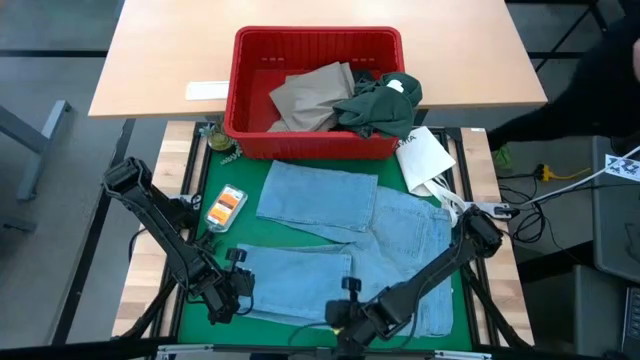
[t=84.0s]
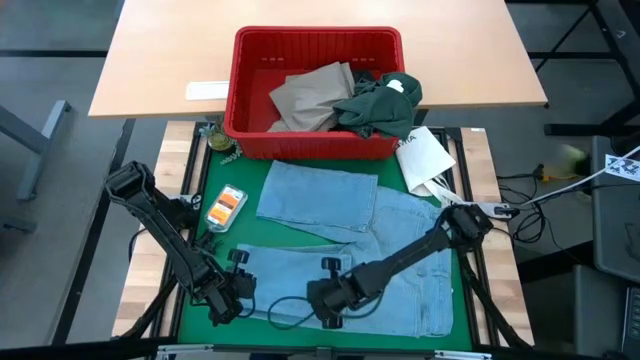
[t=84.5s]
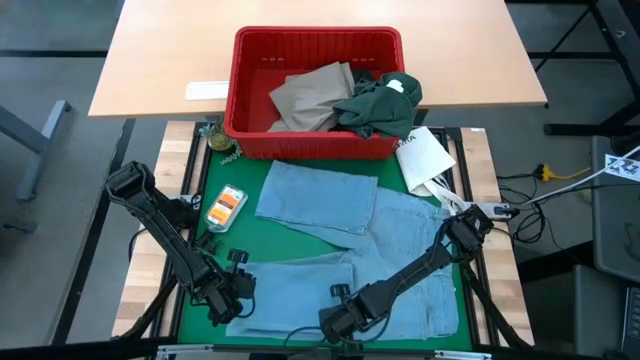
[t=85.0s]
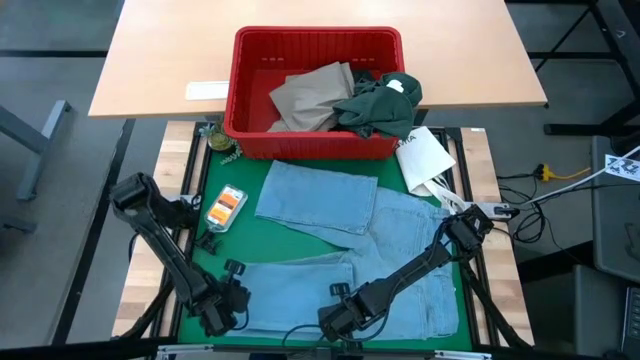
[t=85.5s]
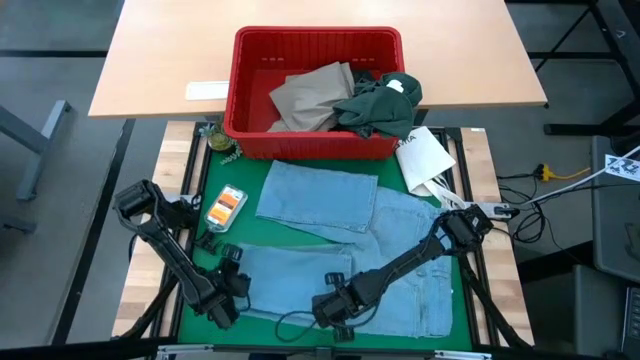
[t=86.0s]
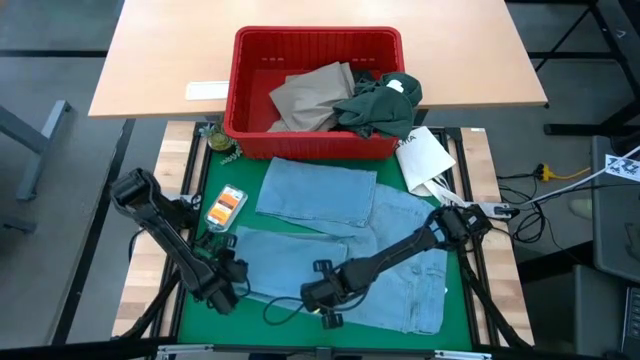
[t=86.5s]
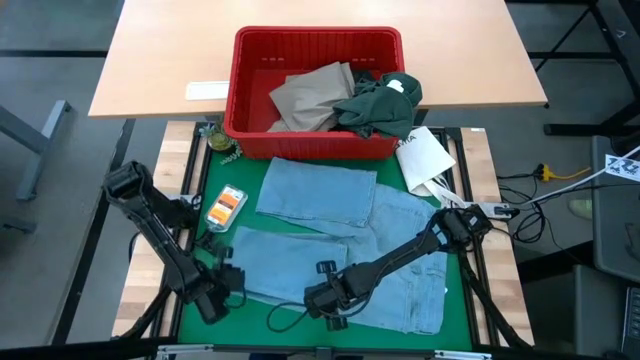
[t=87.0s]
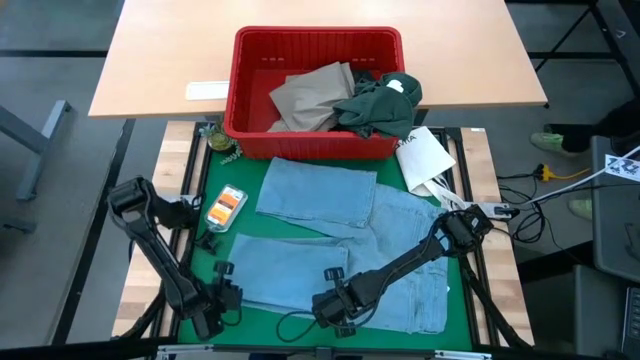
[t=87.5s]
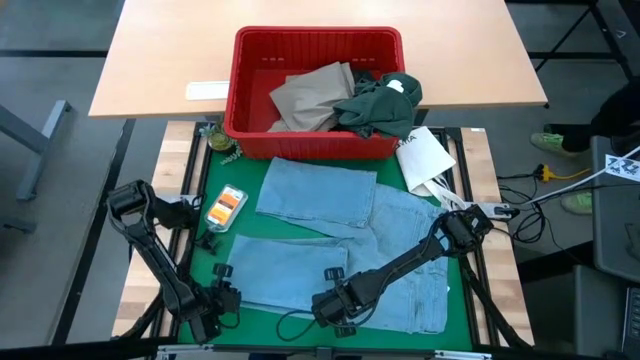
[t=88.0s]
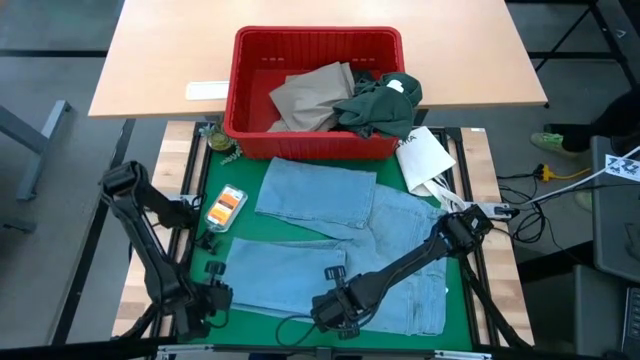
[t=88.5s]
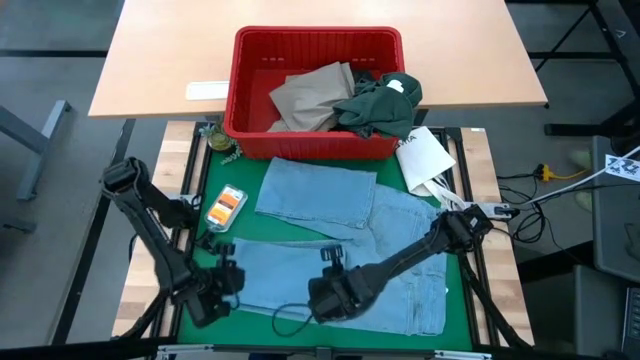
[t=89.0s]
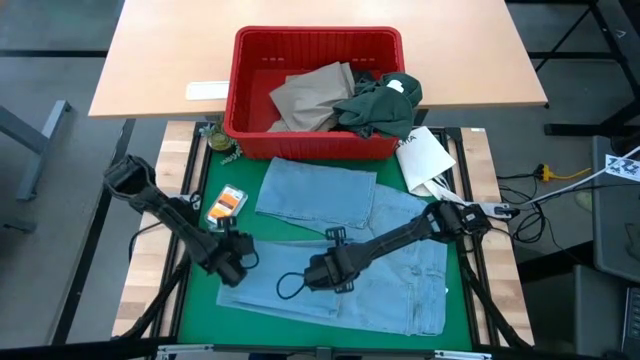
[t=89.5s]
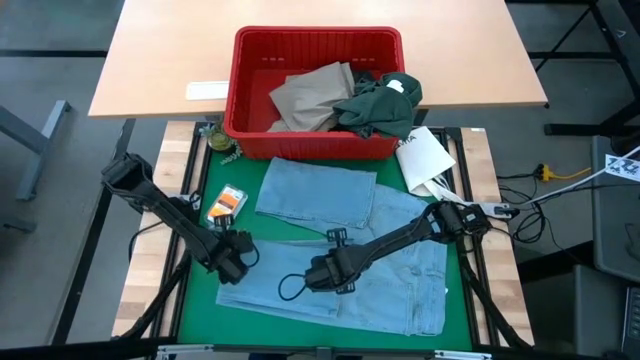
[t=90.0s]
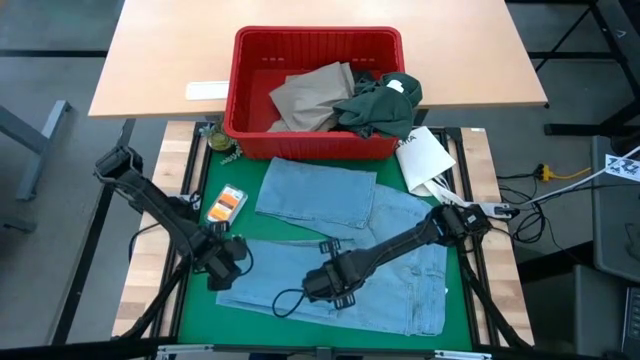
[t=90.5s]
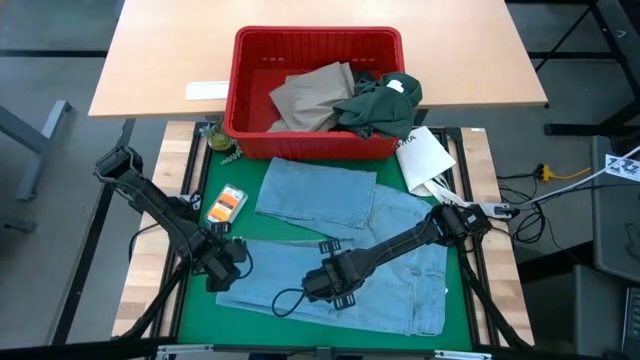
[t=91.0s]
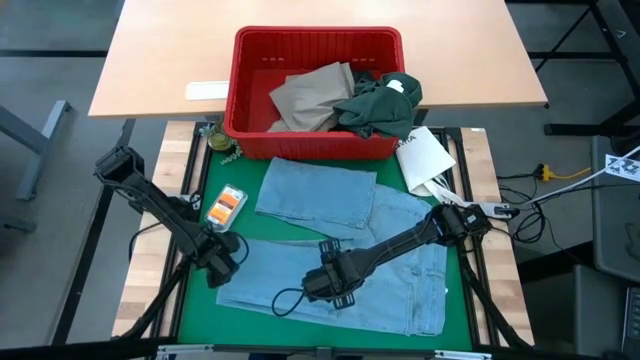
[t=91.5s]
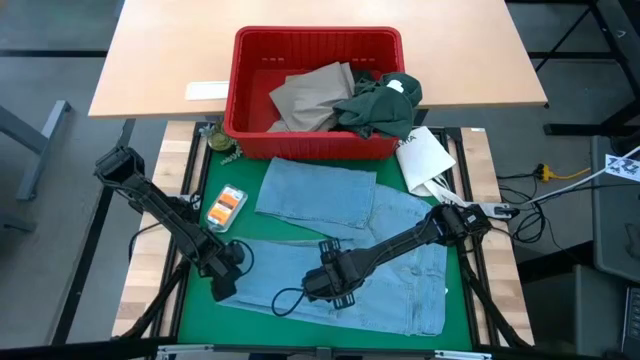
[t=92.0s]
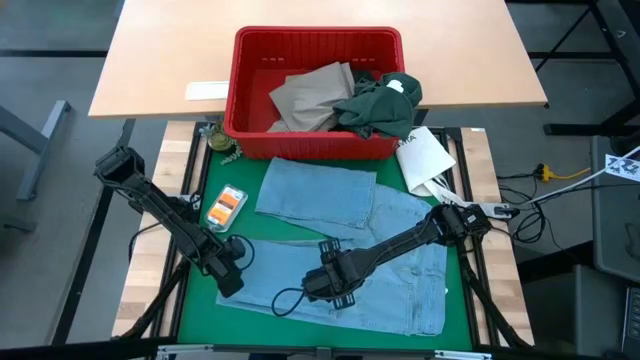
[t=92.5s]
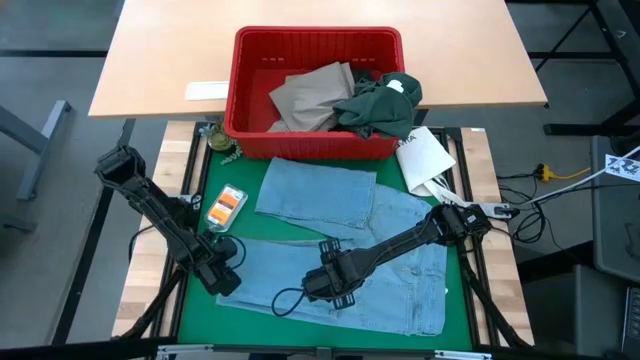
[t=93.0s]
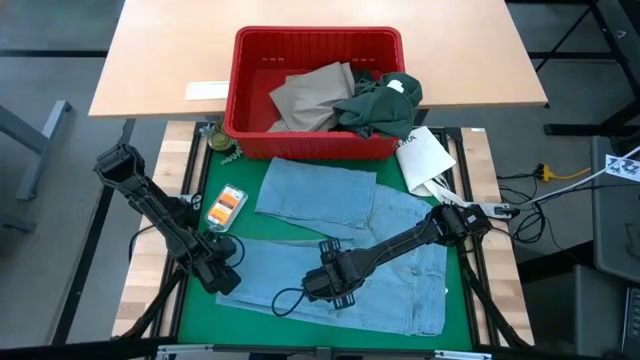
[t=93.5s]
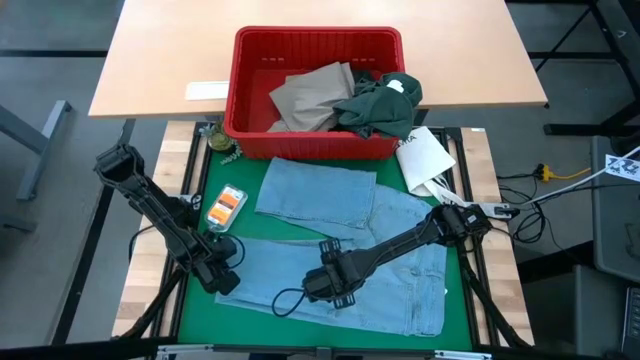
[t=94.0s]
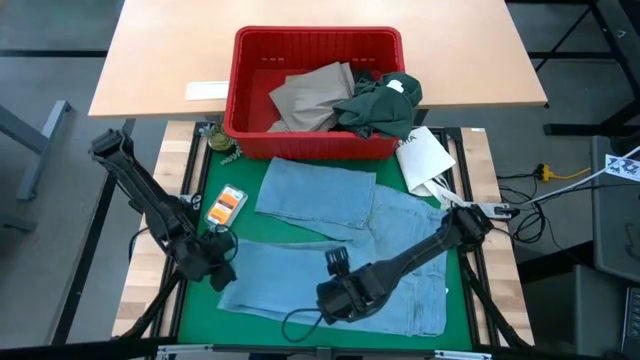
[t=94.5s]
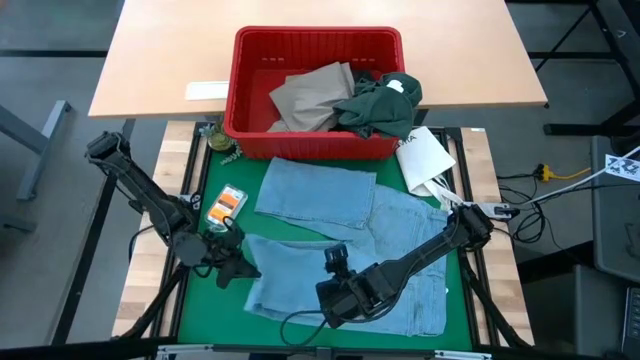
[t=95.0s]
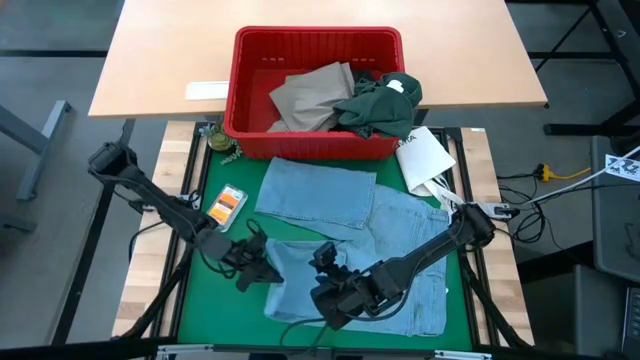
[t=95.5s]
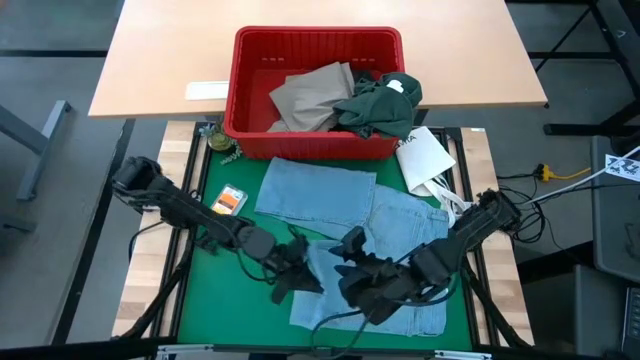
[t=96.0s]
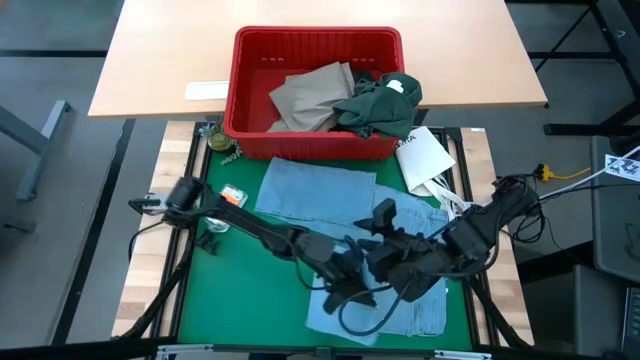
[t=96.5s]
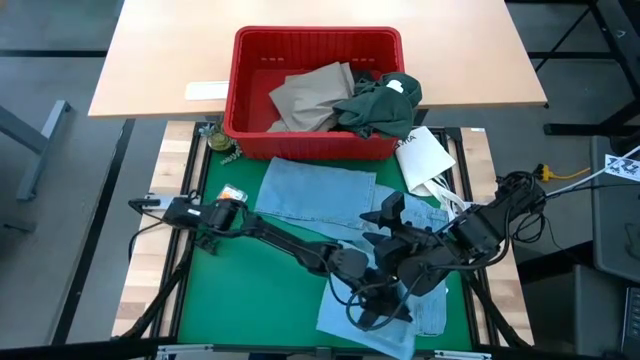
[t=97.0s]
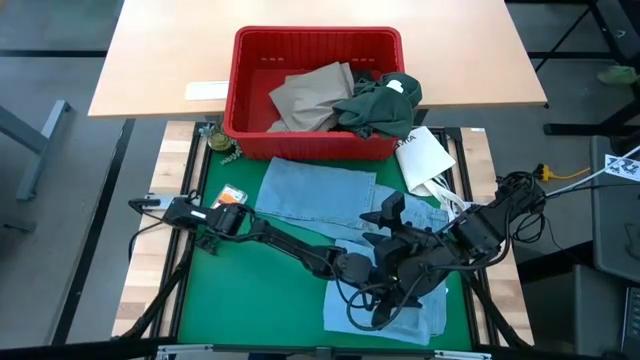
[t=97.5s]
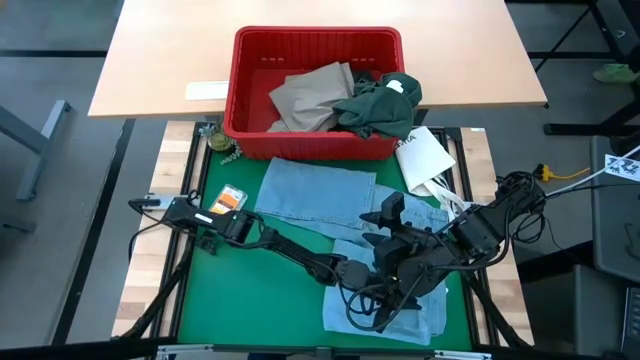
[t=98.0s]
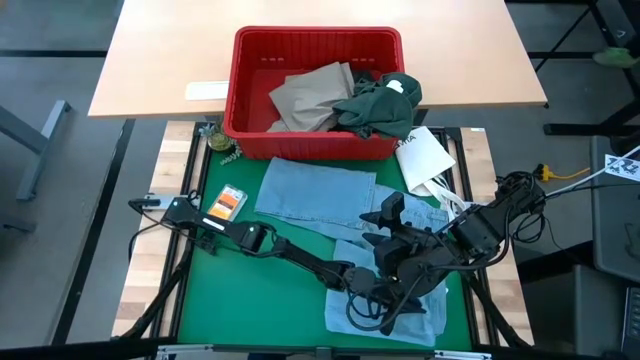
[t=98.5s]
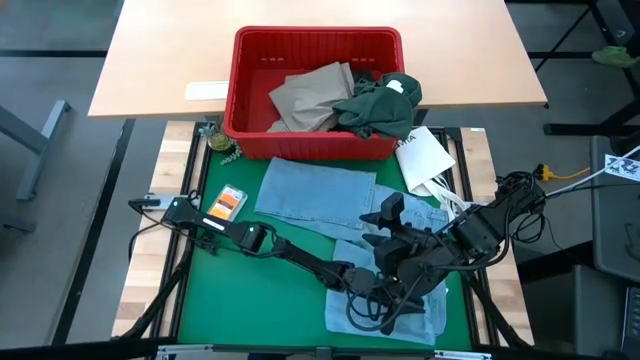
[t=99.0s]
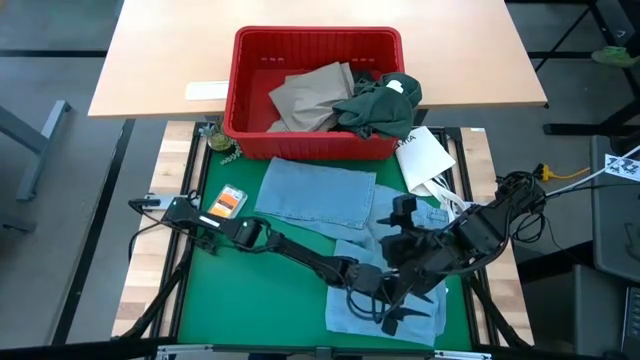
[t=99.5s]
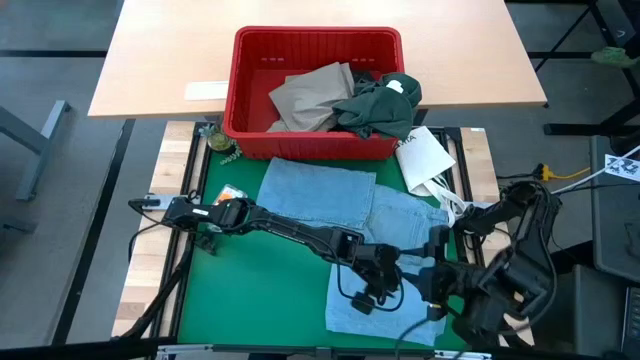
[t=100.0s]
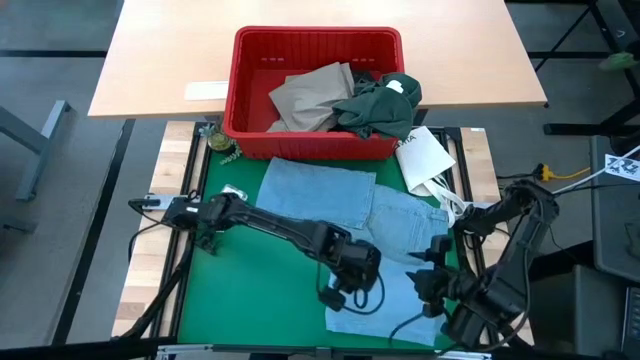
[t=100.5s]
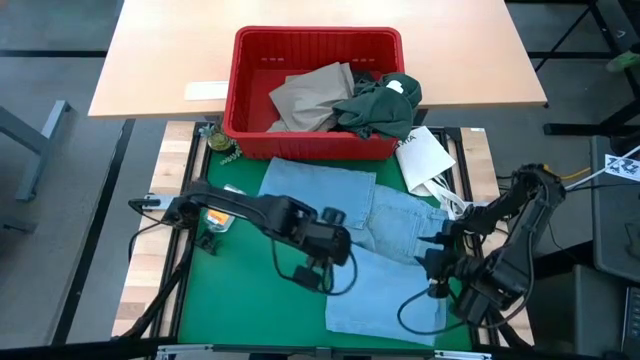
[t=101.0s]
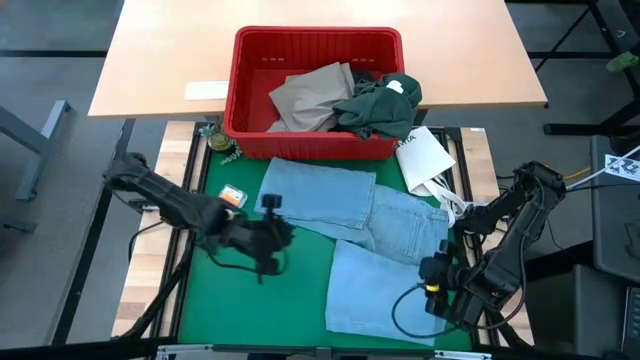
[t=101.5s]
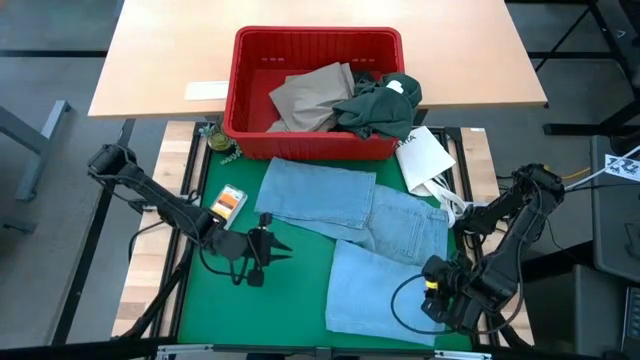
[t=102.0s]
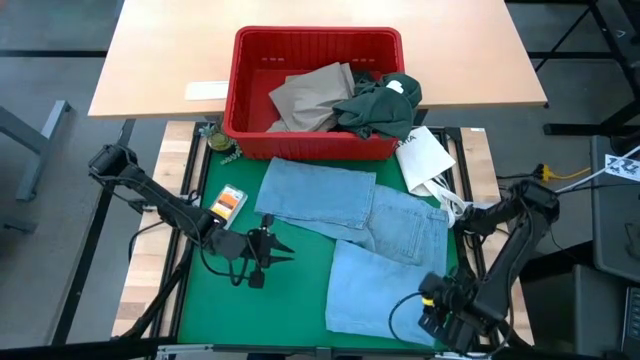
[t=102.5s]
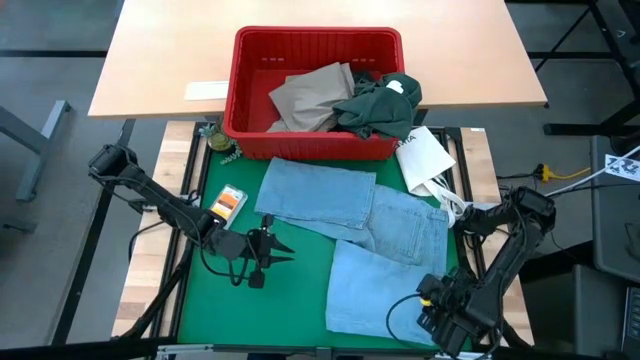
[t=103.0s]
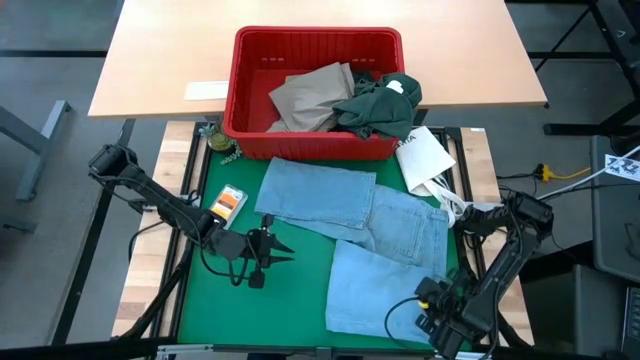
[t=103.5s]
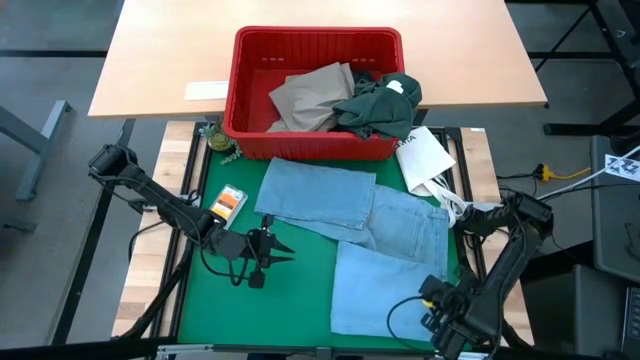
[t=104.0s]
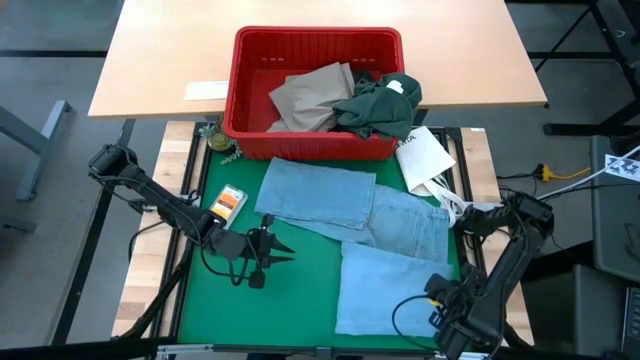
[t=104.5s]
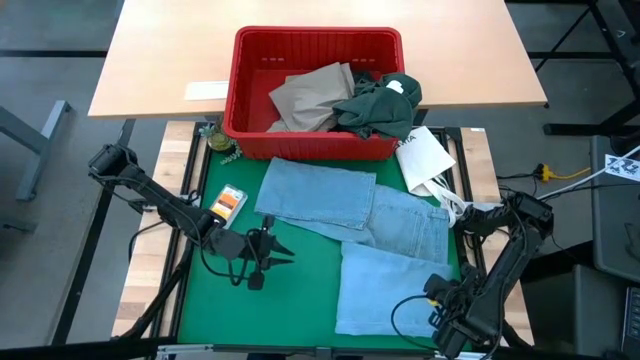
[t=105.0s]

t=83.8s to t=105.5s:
Task: Fold Laundry from Bin
Fold the blue pants
